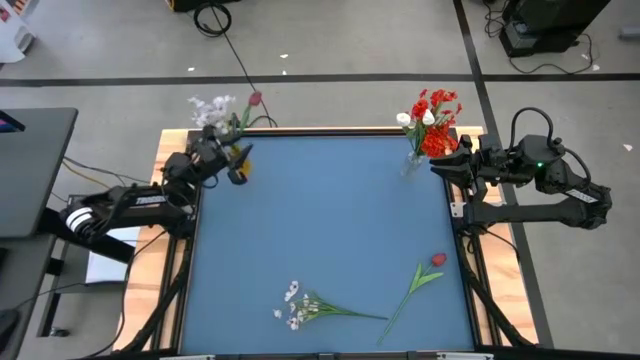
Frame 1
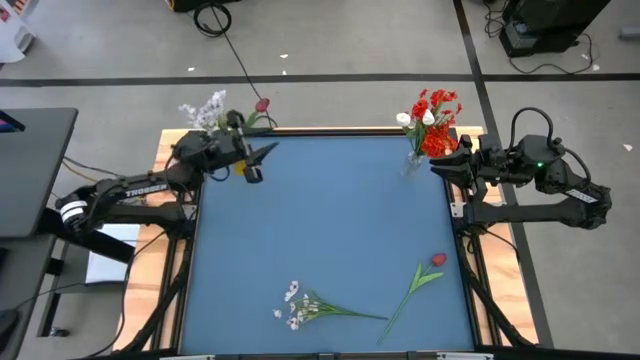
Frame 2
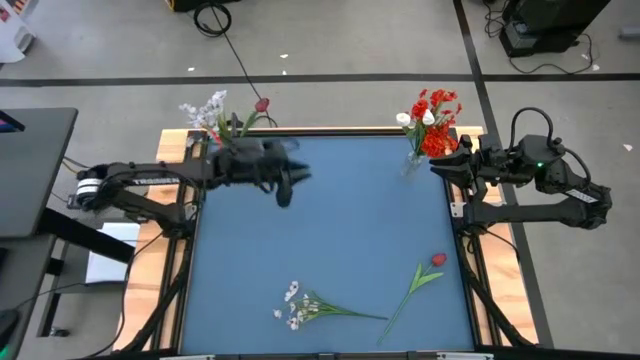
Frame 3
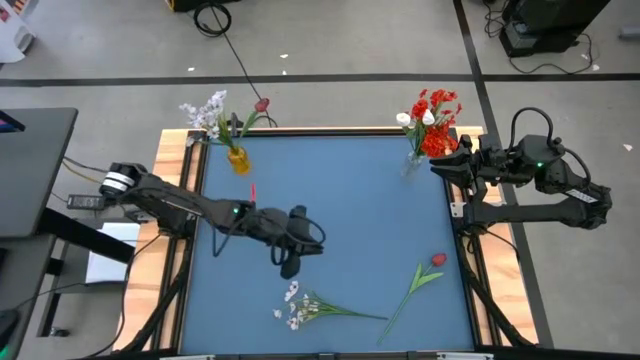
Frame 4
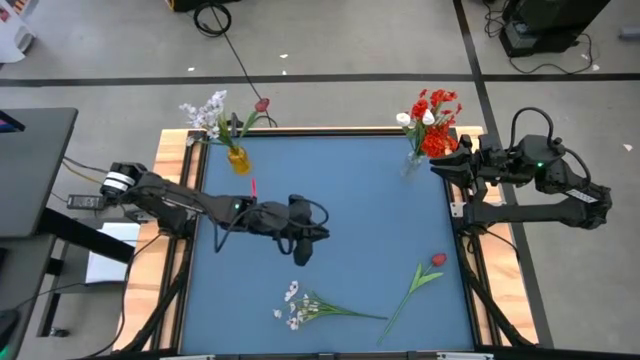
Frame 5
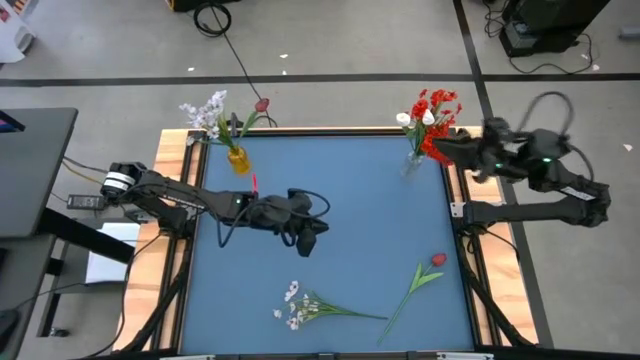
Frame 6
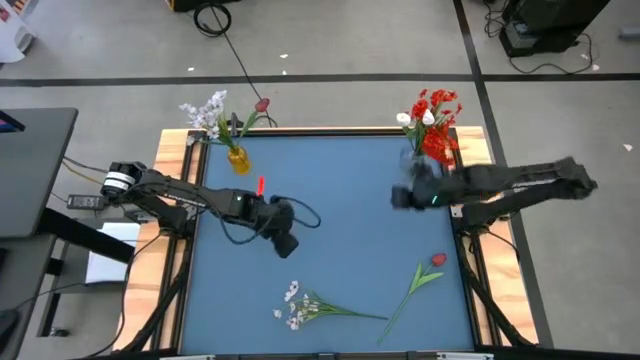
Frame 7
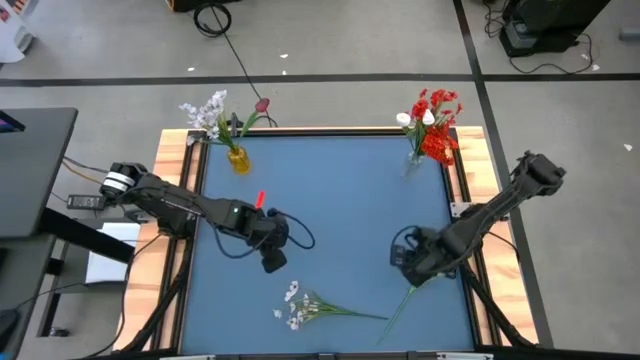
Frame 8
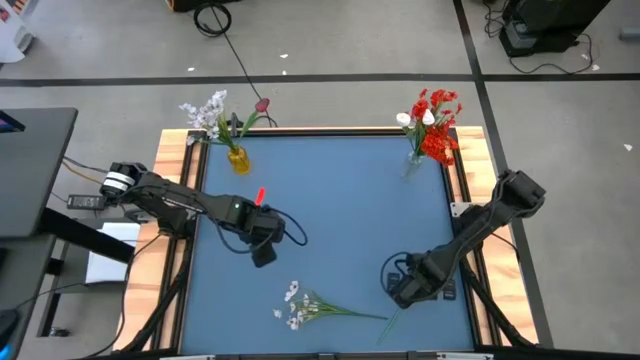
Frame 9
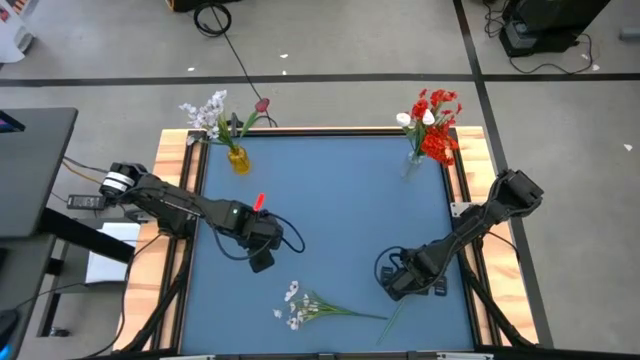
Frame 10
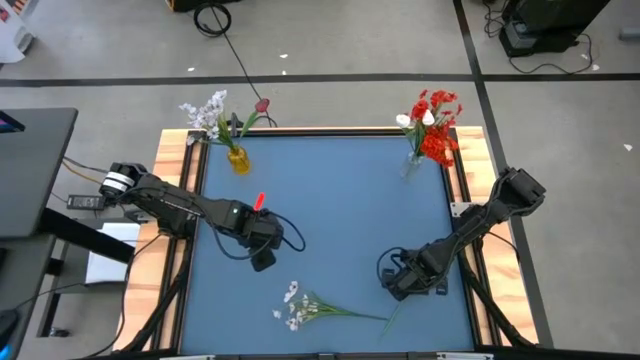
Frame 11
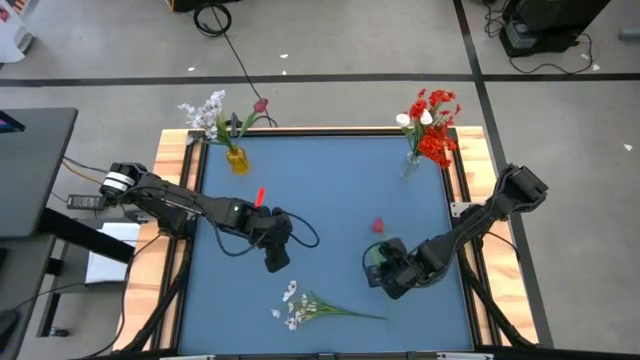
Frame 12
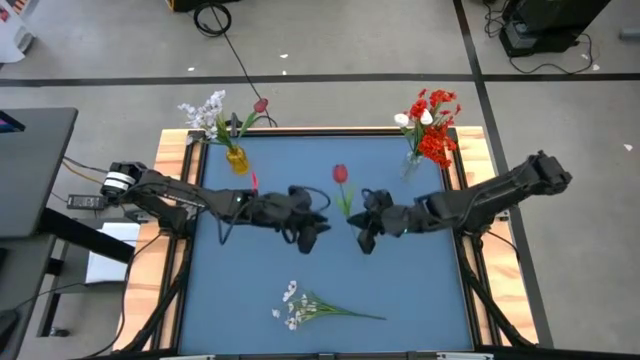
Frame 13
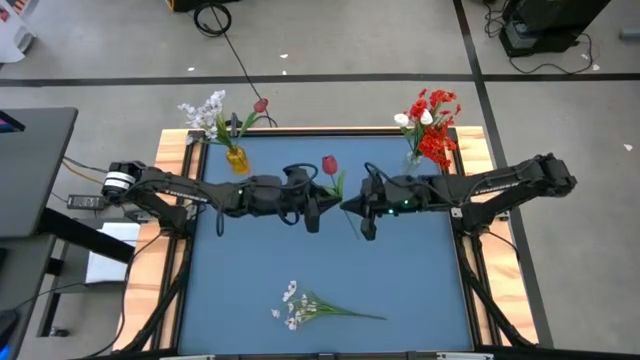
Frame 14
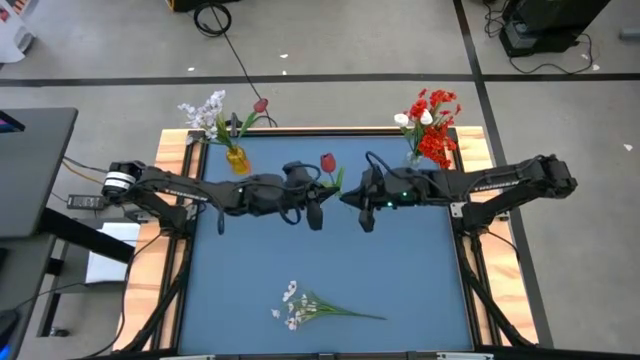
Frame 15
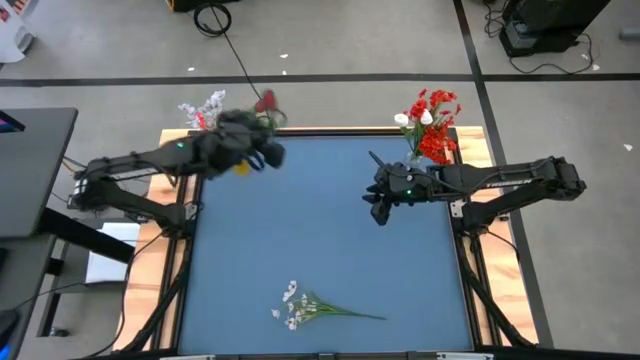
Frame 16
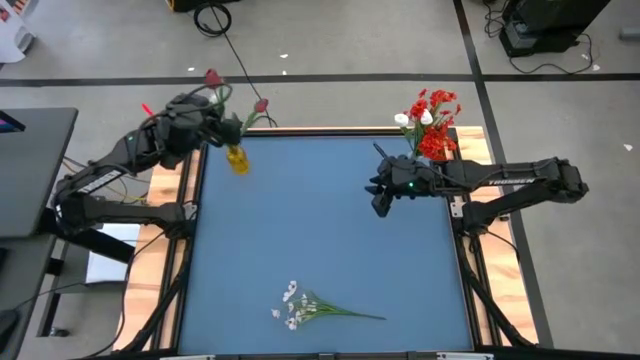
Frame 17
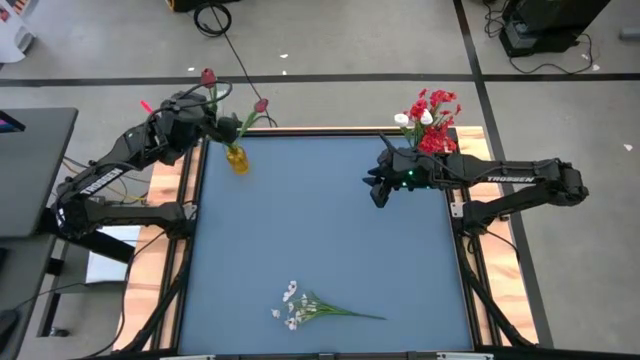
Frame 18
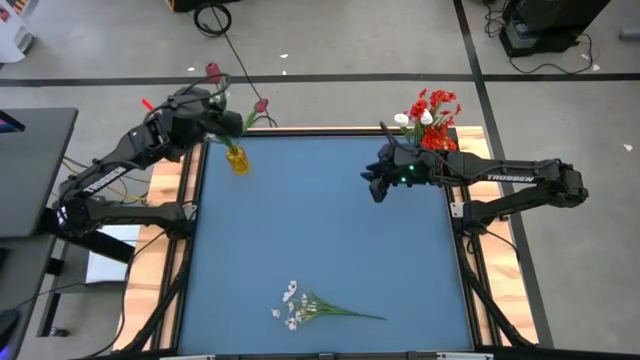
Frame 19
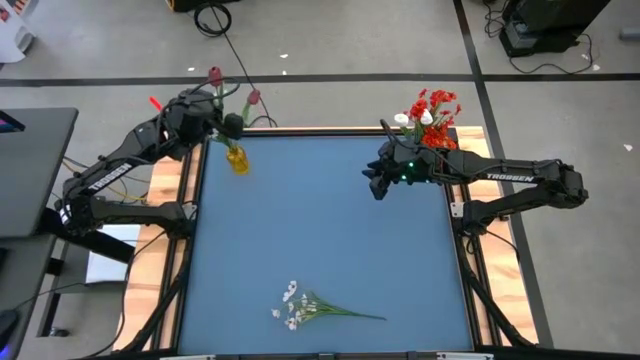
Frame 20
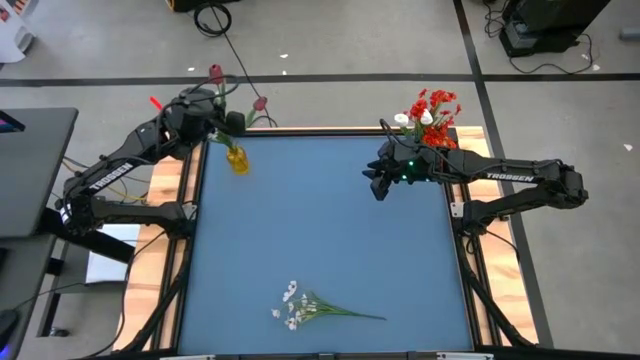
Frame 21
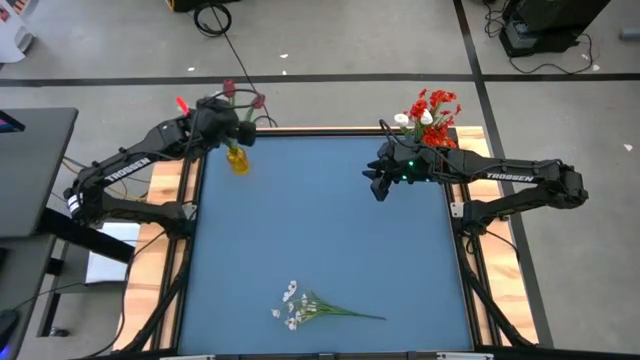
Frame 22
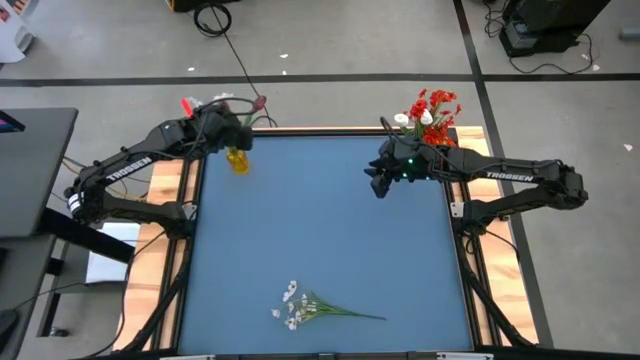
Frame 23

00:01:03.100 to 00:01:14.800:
Task: Sort flowers into vase by color
Put the red tulip into the yellow vase

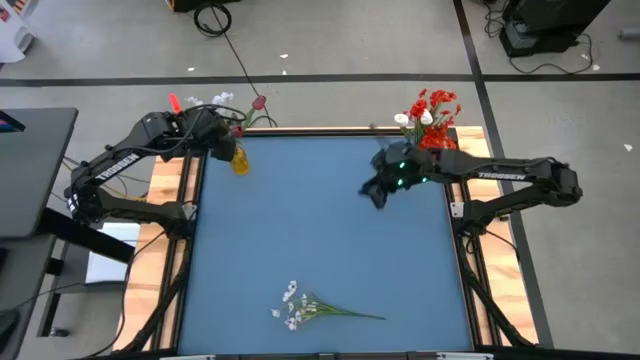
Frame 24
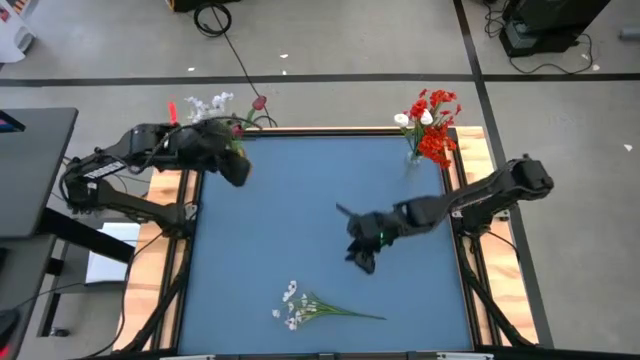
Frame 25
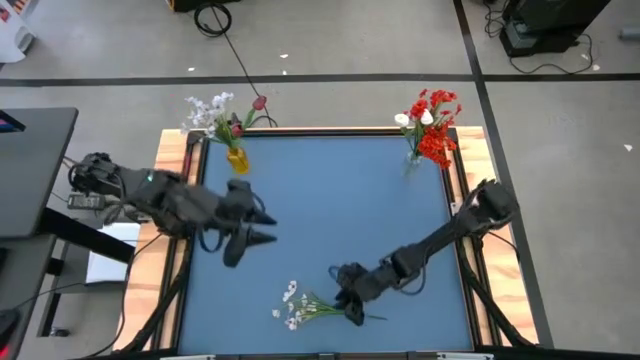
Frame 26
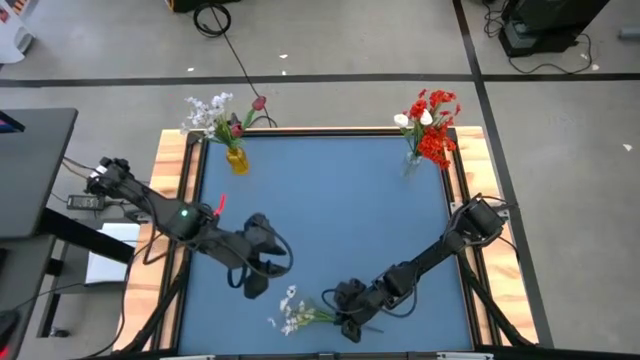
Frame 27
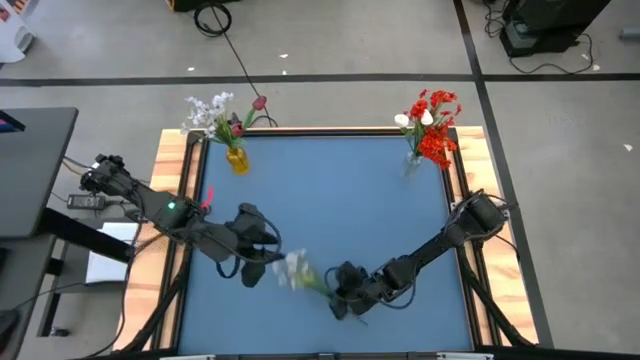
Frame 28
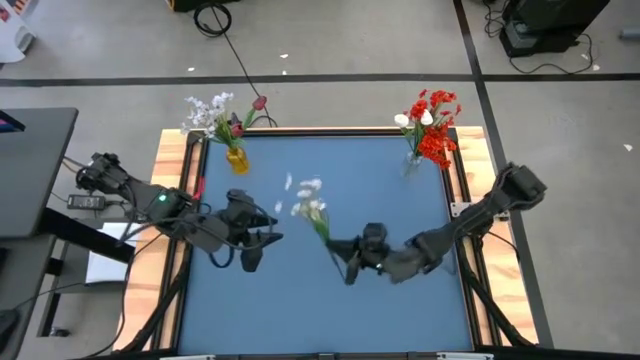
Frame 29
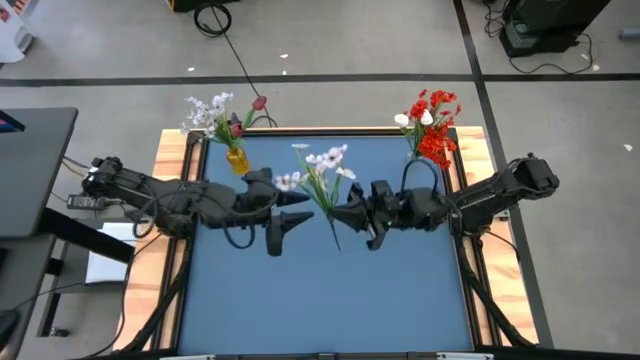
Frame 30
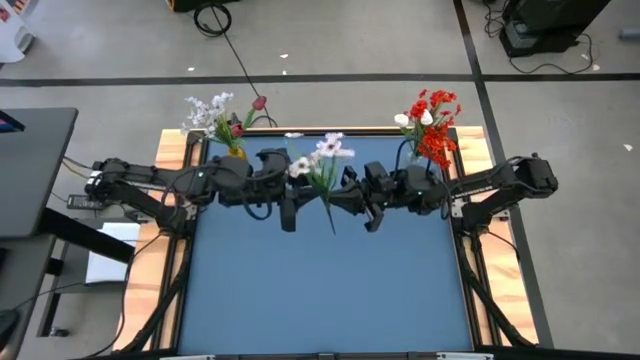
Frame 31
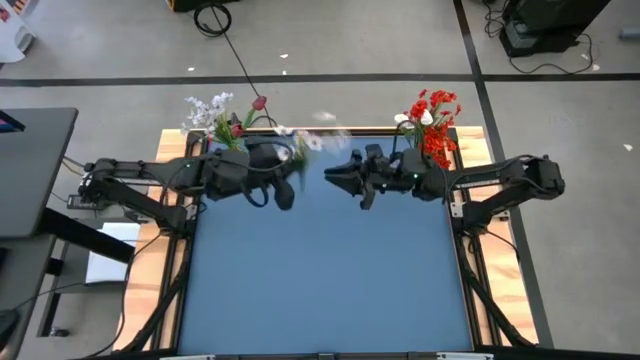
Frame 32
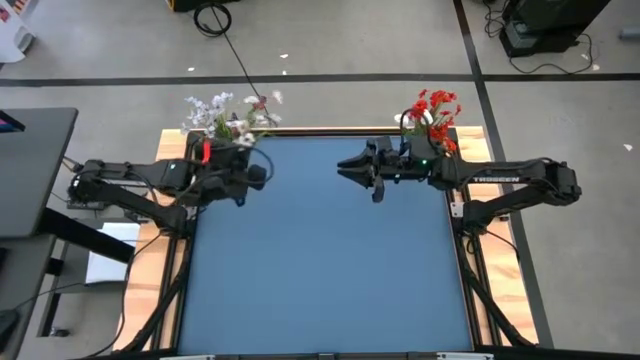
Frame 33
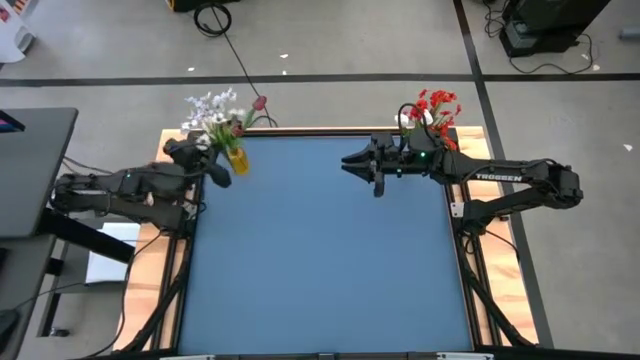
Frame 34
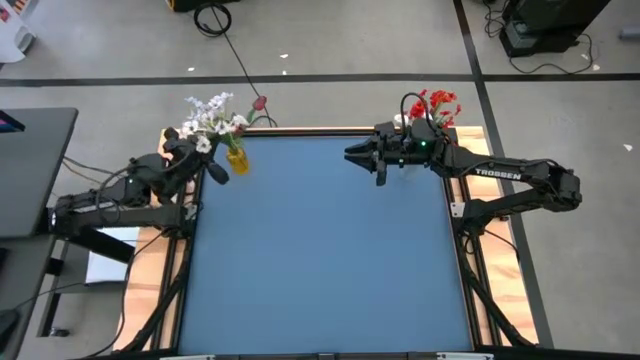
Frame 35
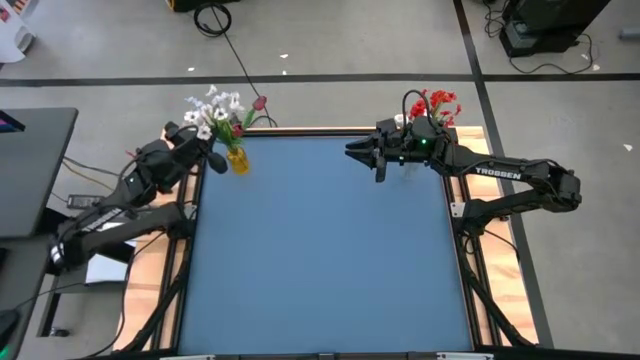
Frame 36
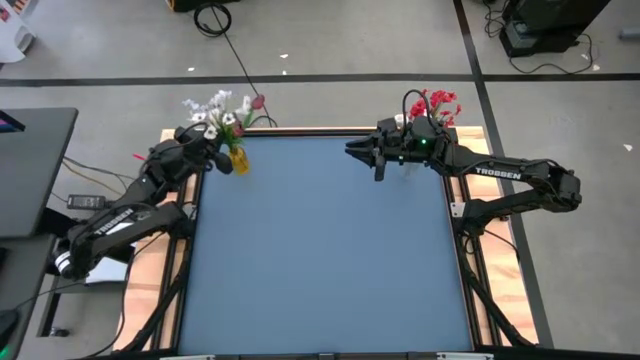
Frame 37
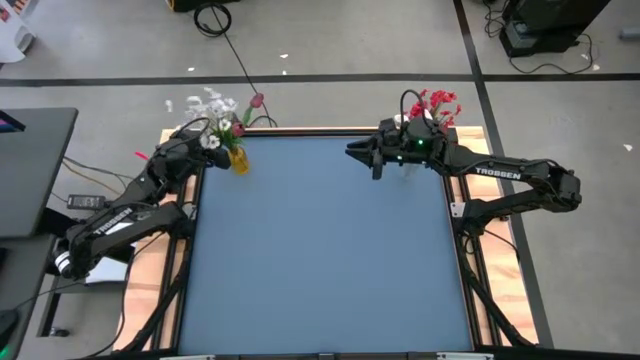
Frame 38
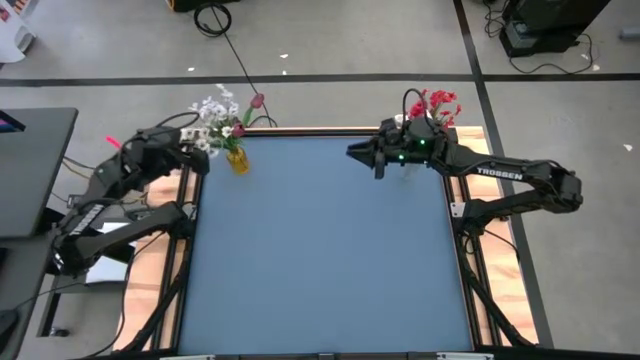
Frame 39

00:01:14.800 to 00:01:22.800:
Put the white flowers into the yellow vase

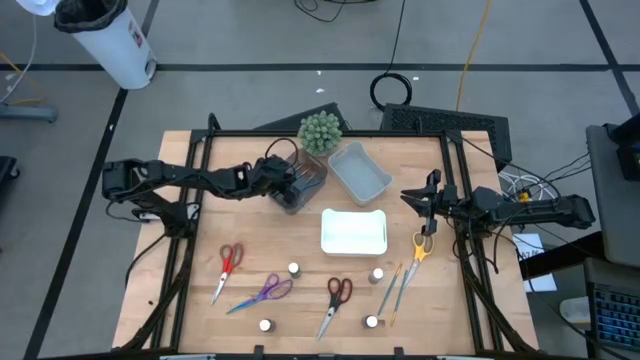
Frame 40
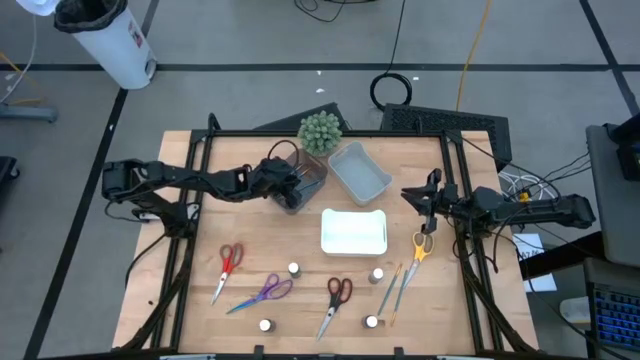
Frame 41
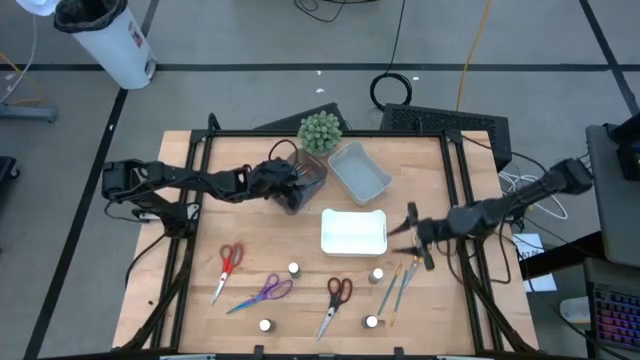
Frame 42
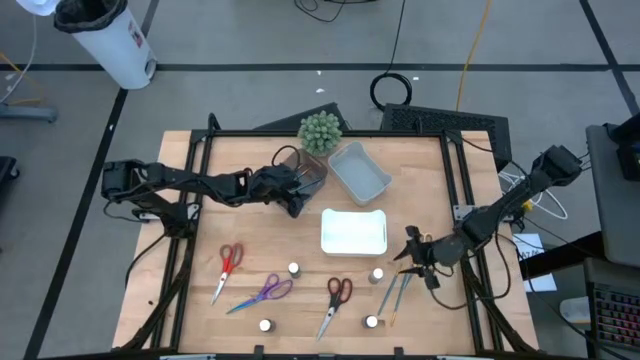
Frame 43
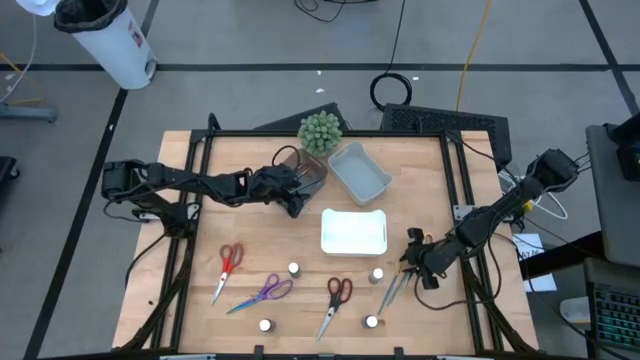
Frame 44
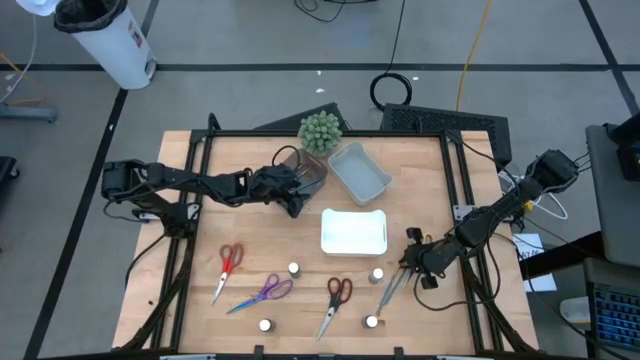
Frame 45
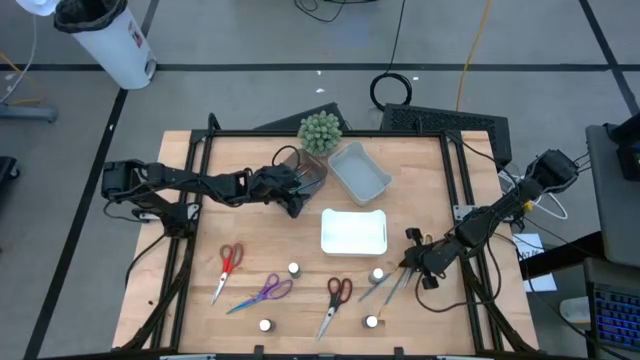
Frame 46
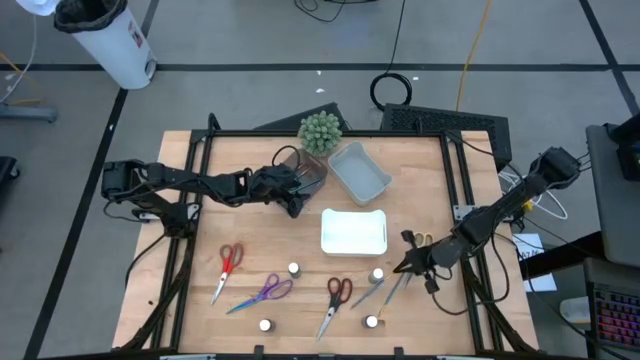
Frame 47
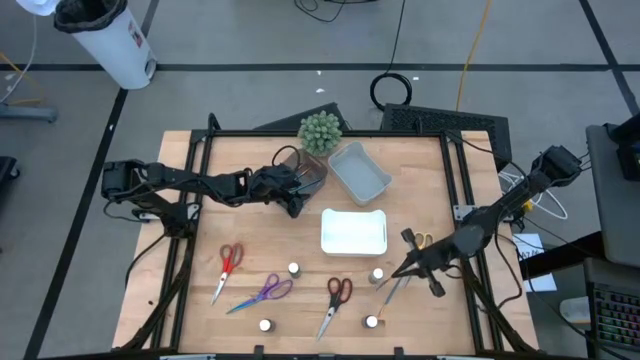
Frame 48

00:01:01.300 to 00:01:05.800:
Task: Pick & Place Paint Supplies
Put the blue paint brush into the black bin
